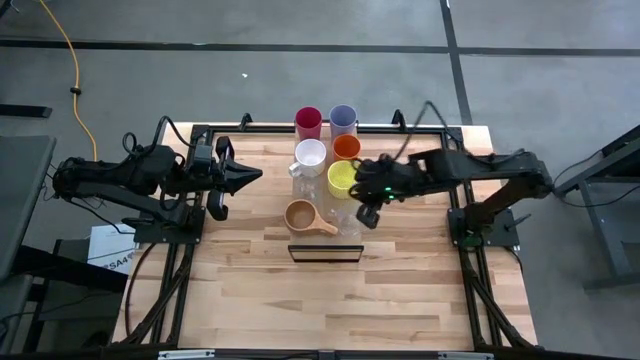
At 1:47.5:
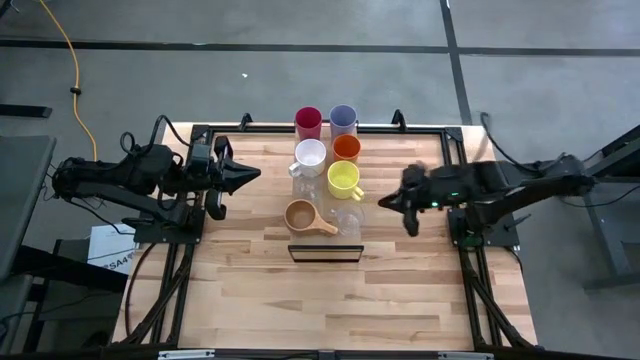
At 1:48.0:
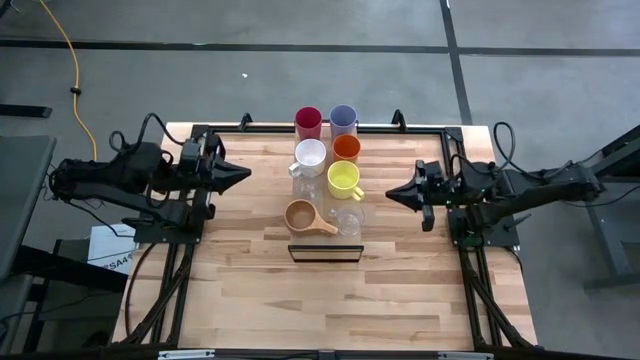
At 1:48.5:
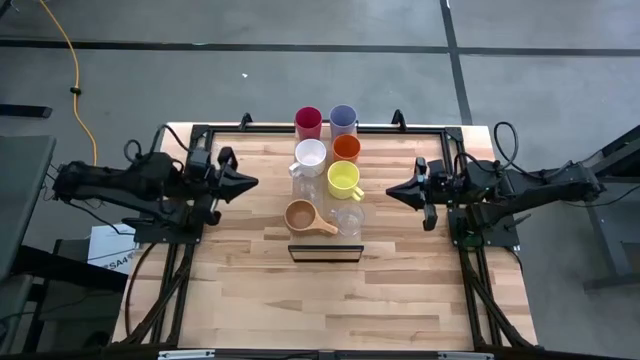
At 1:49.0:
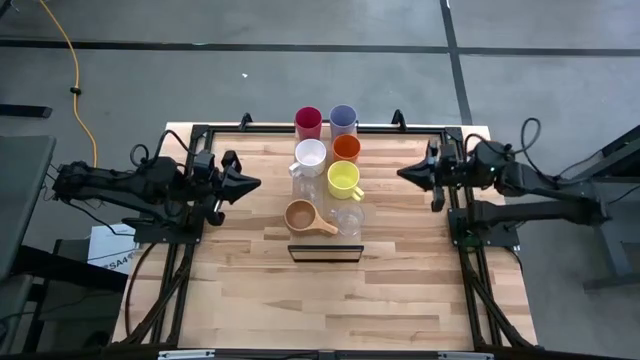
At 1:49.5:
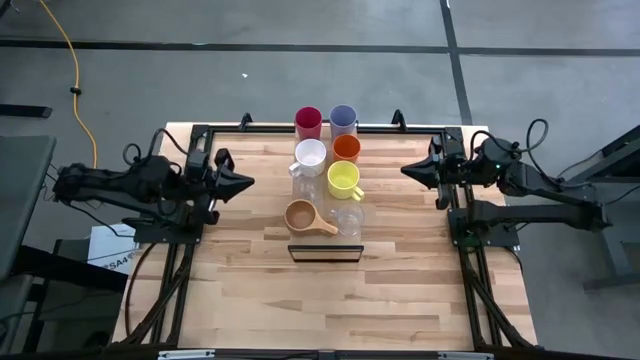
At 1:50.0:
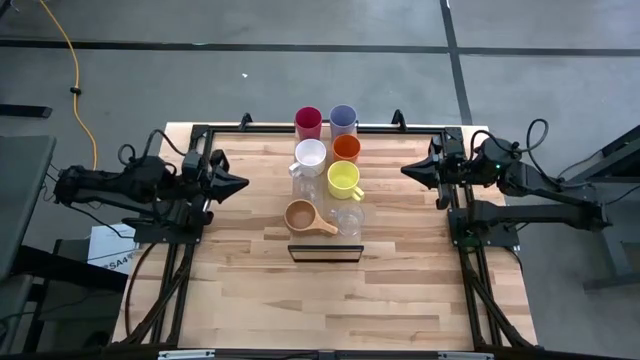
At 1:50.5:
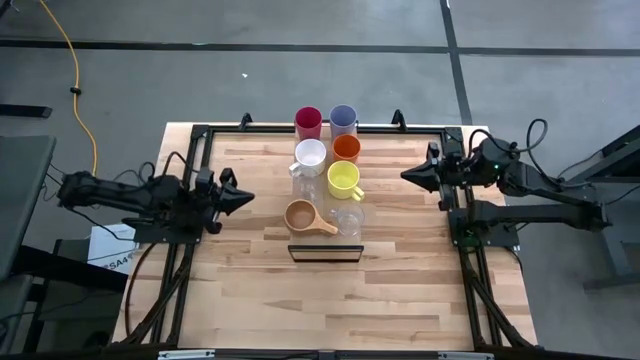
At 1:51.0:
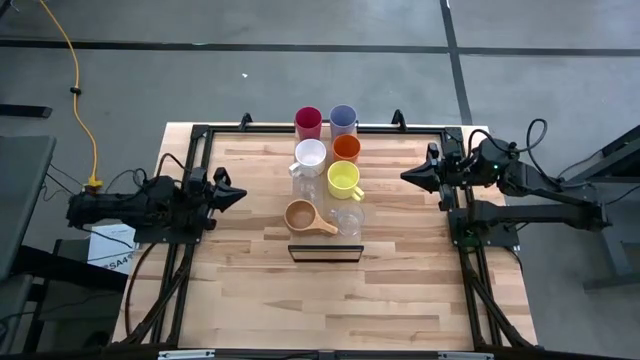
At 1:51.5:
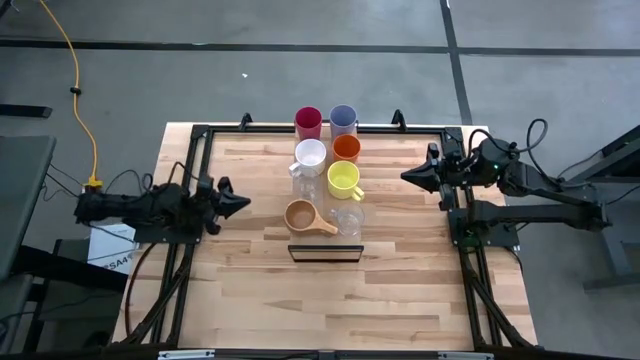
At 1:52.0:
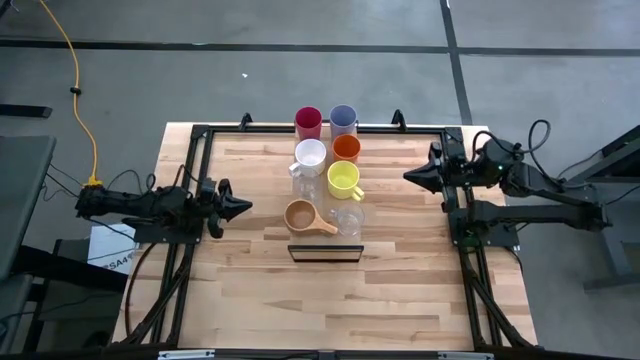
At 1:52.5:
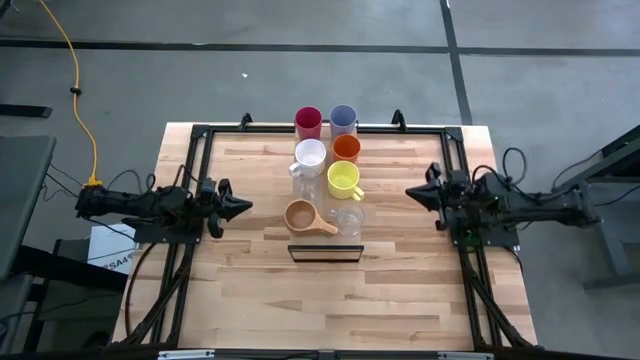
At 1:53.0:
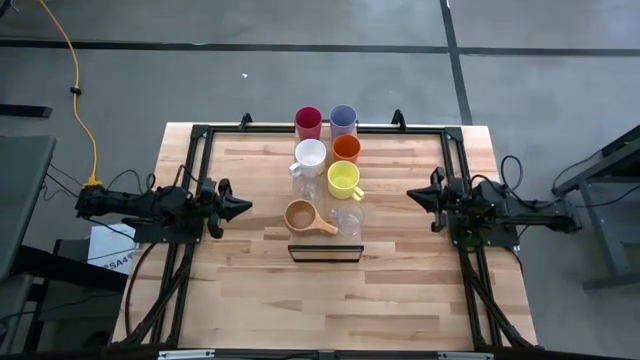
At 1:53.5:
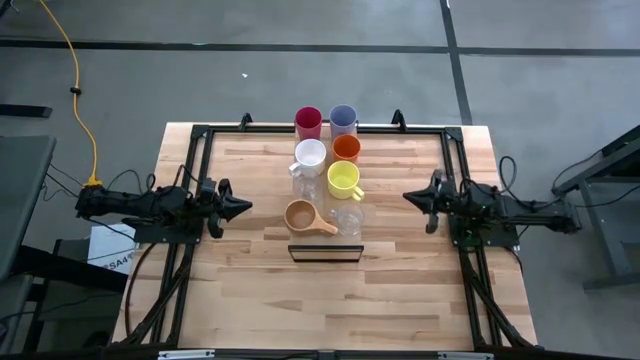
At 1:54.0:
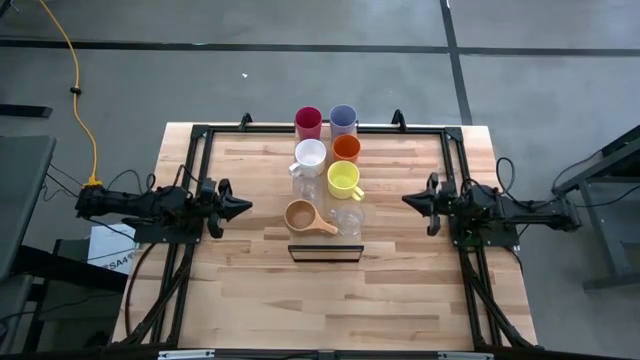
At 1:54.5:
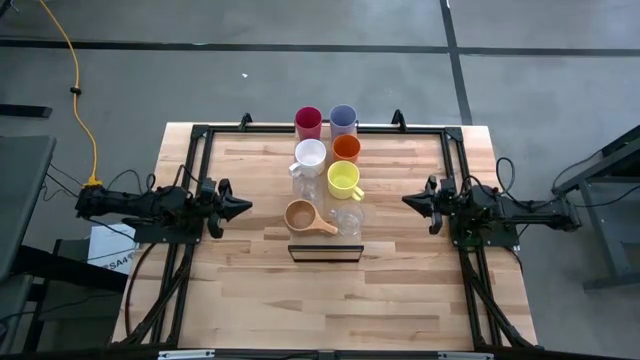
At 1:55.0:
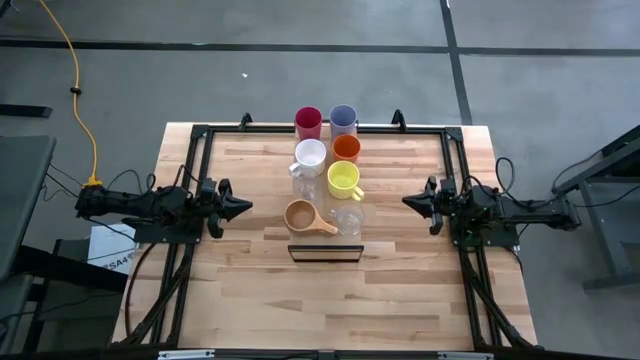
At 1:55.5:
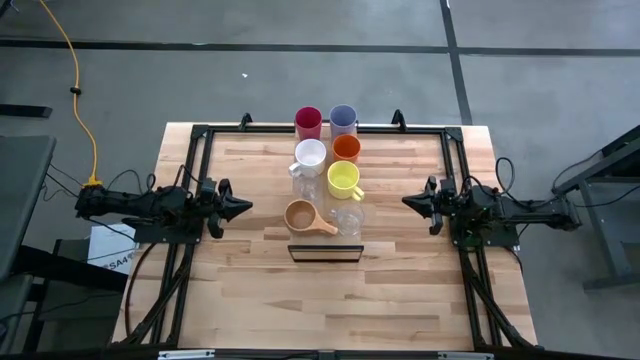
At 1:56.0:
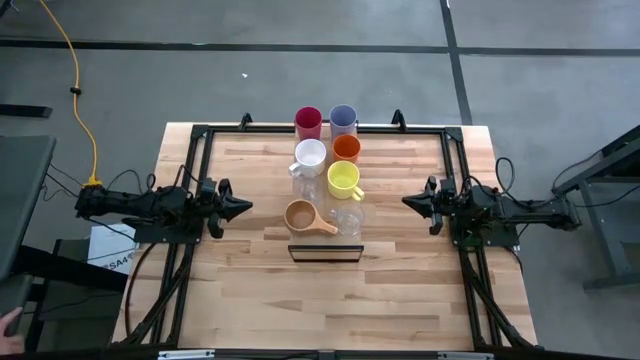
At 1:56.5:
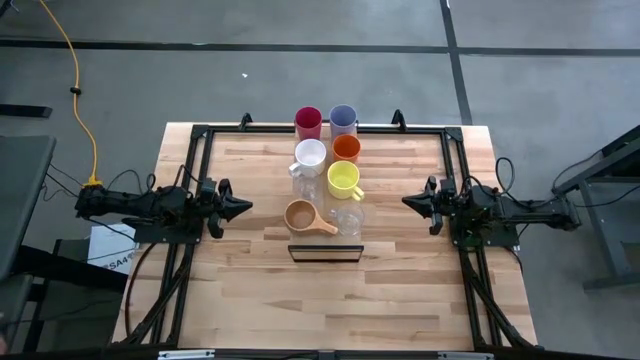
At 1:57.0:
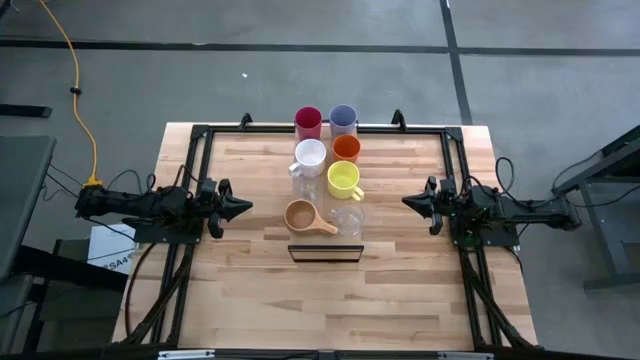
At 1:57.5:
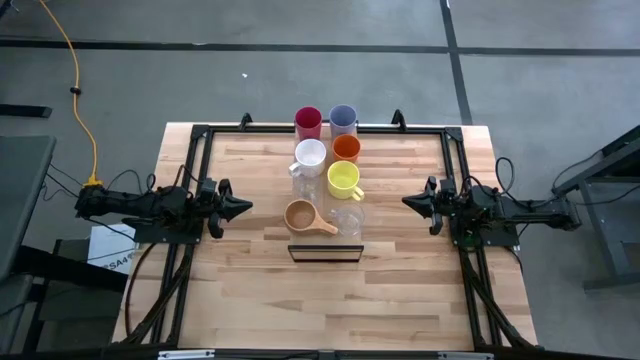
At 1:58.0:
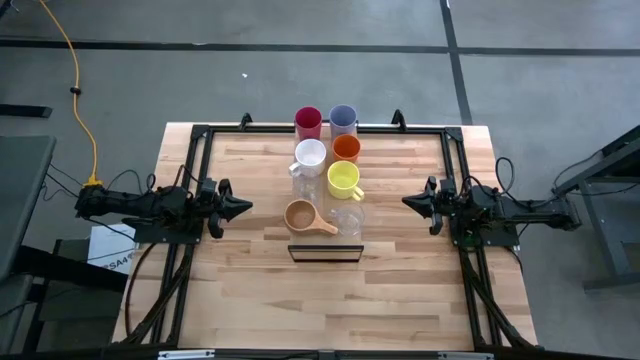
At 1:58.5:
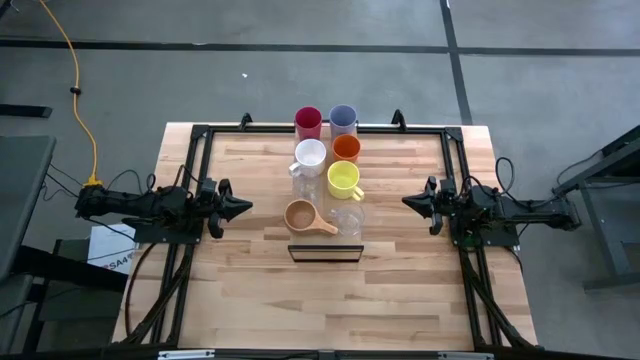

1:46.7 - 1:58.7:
Task: Stack small to large cups/mugs on shelf
Return to Home Position

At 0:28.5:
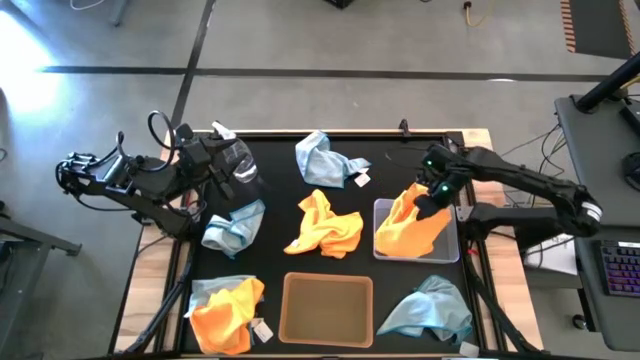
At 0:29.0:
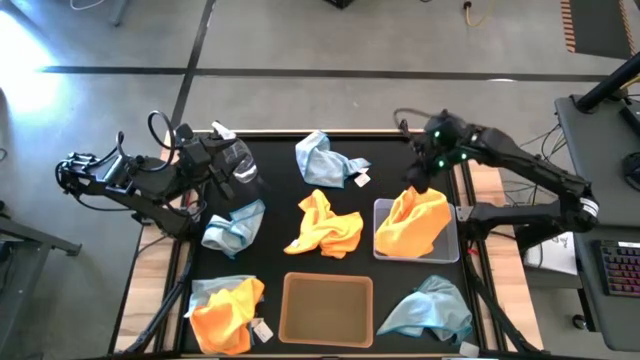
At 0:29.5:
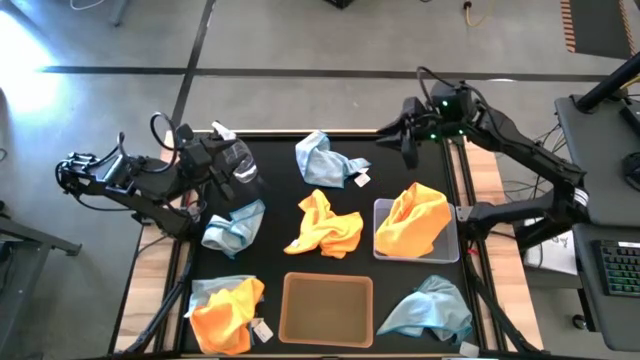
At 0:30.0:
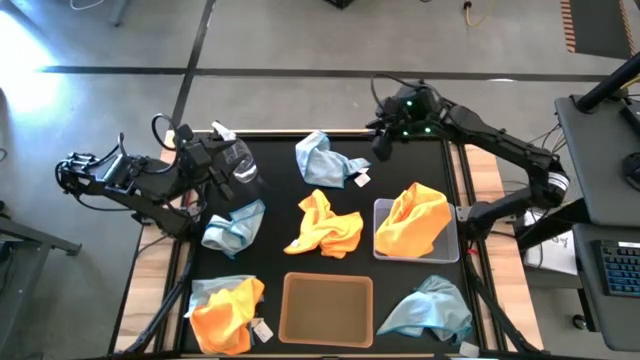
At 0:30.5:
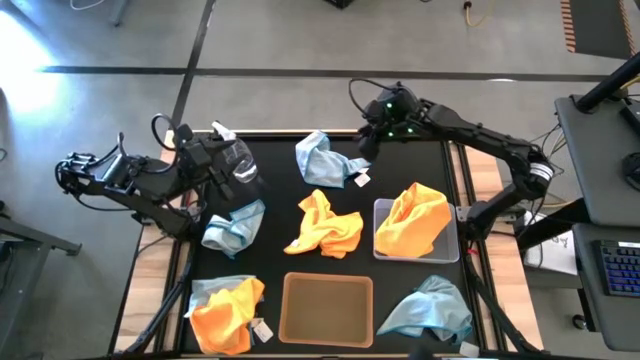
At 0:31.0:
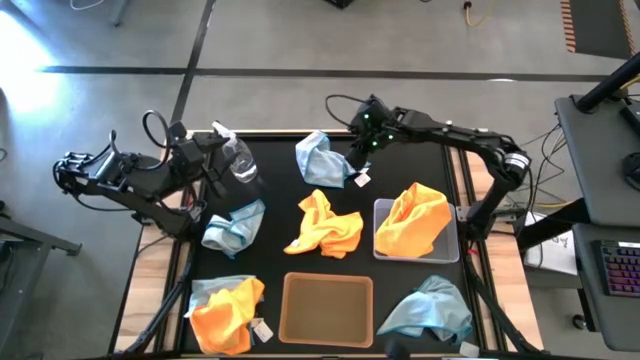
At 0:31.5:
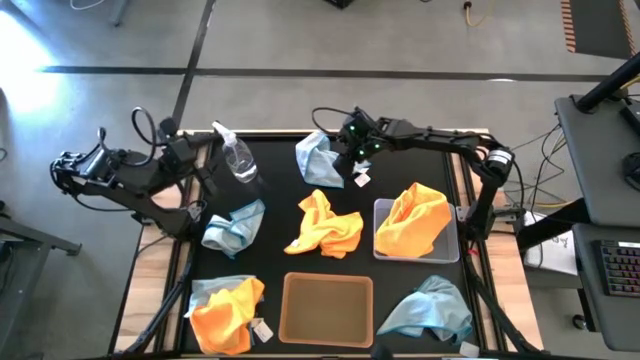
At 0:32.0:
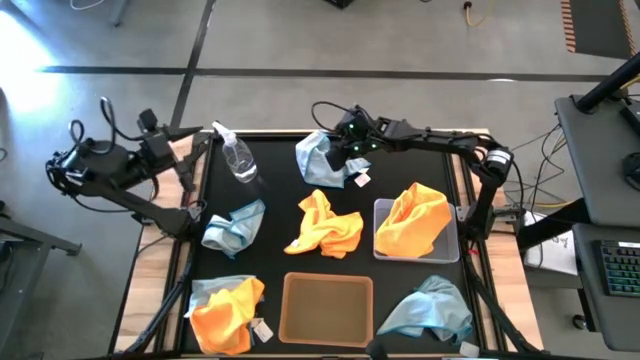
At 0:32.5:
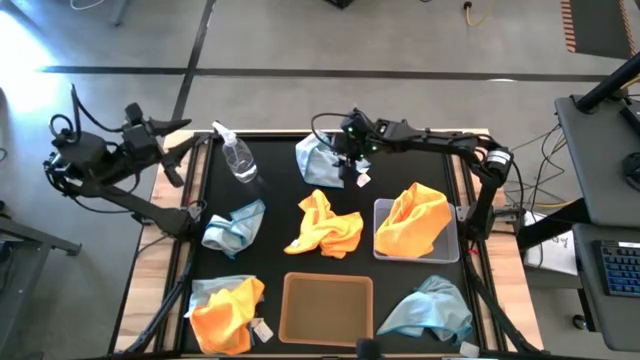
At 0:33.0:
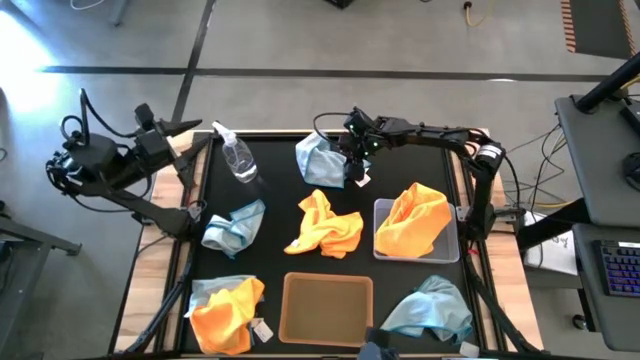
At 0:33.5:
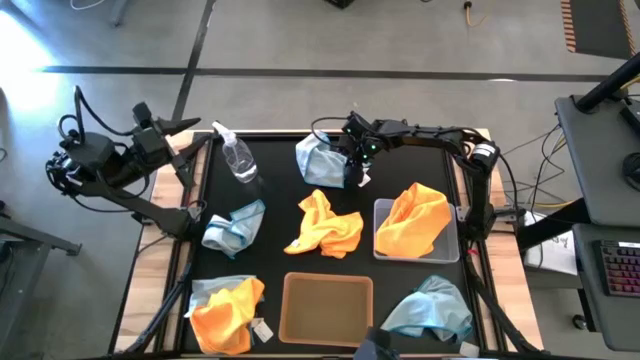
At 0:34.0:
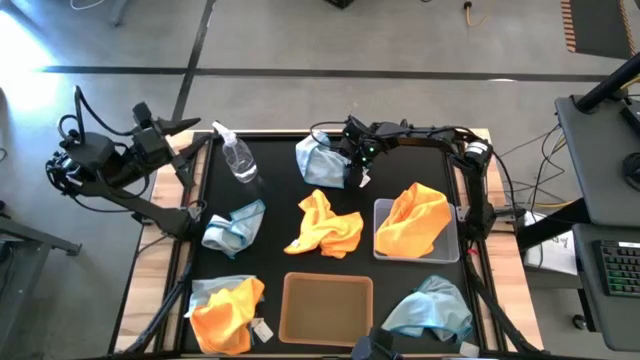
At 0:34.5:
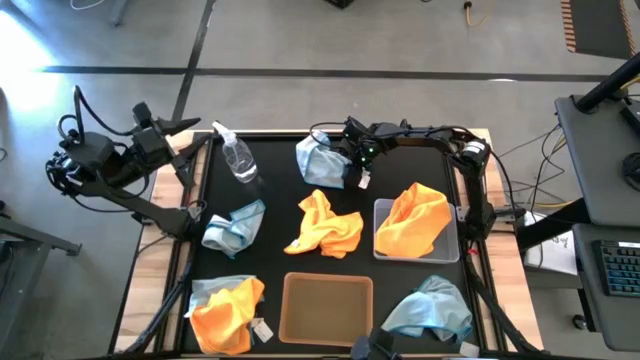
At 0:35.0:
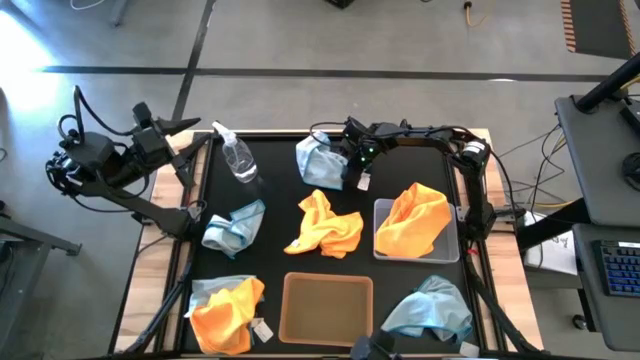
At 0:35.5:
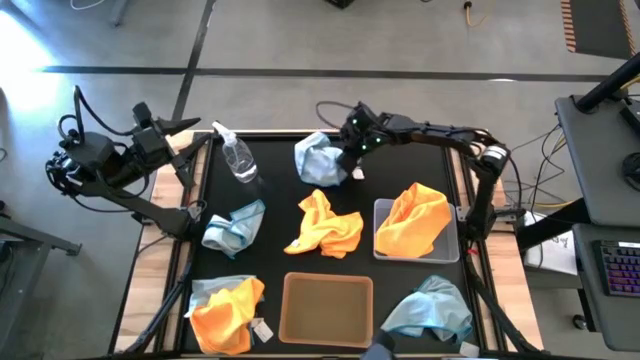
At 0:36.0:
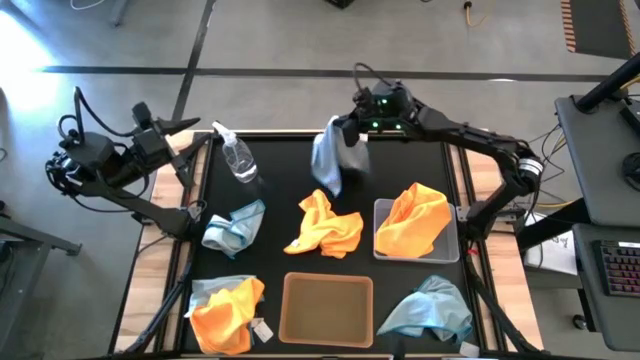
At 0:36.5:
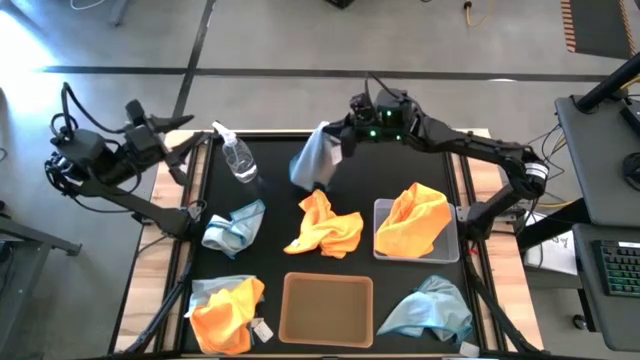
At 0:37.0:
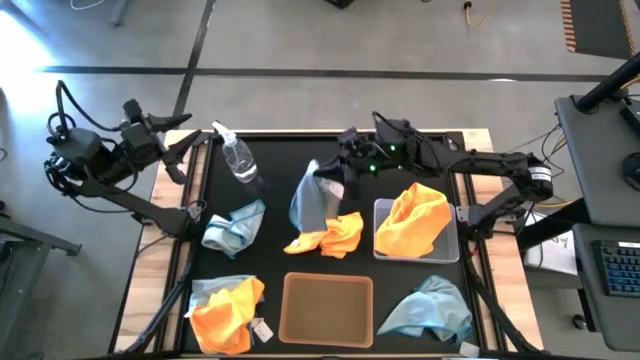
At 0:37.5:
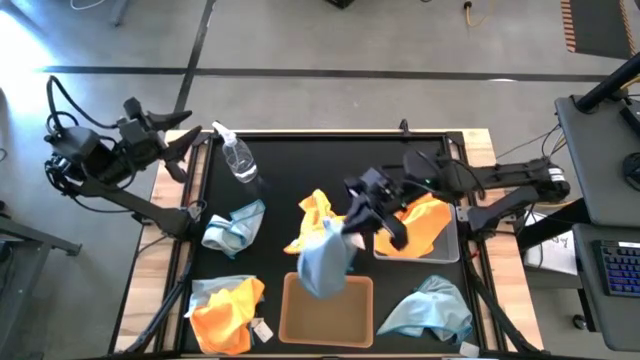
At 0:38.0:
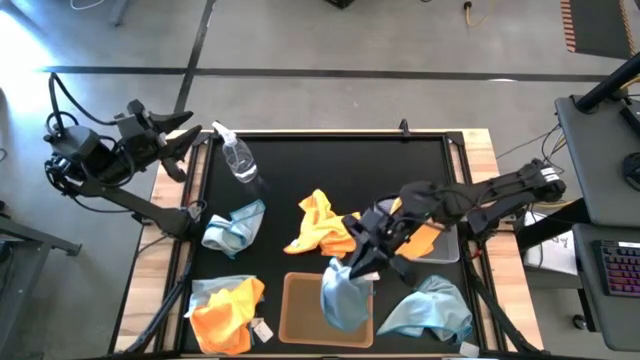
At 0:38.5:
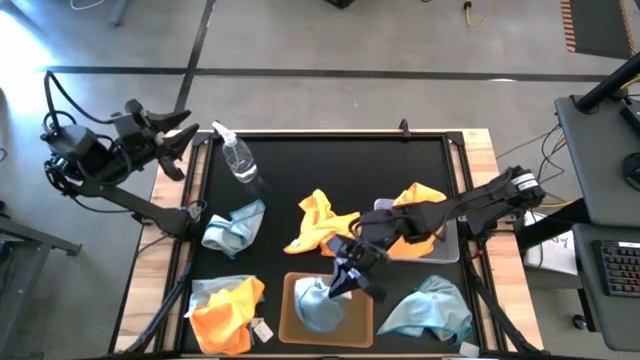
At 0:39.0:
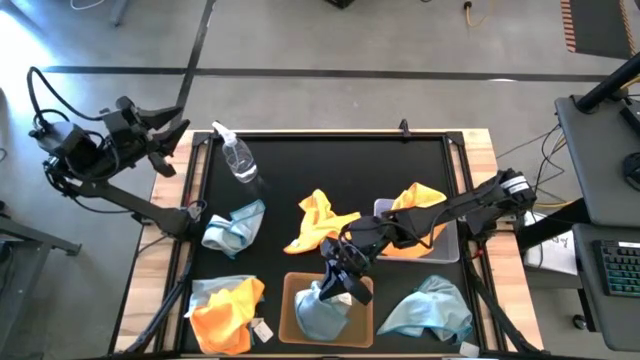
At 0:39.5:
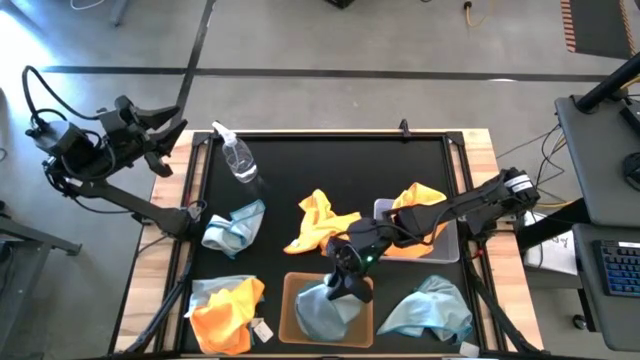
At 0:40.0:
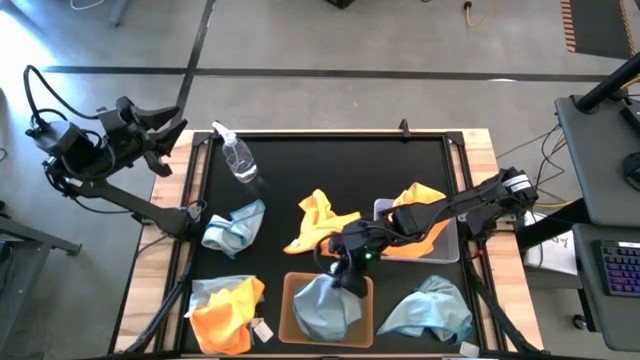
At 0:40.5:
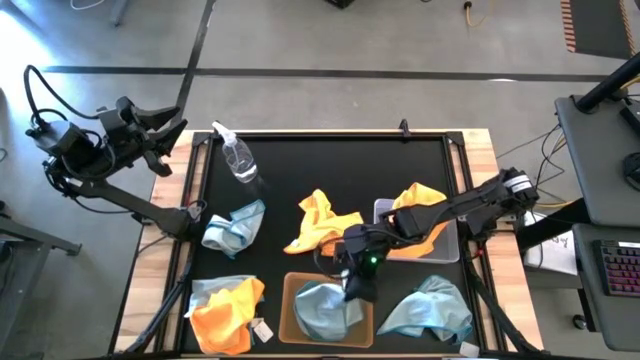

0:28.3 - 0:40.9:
Task: Sort microfiber towel by color & place in baskets
Put the blue microfiber towel into the orange bin
